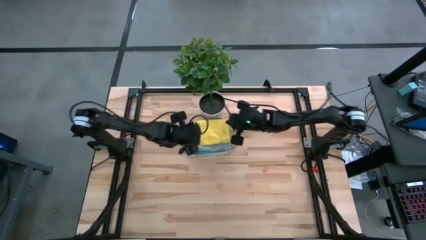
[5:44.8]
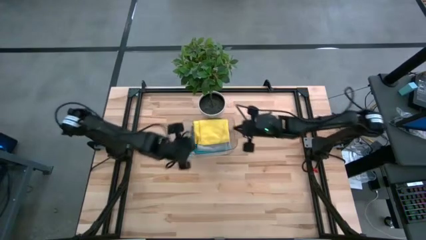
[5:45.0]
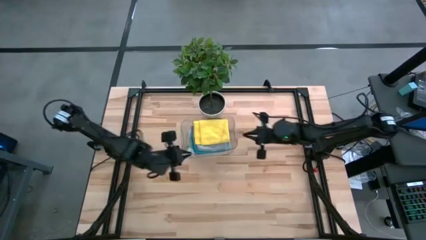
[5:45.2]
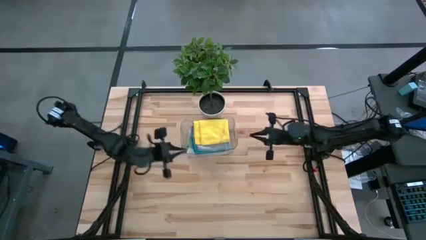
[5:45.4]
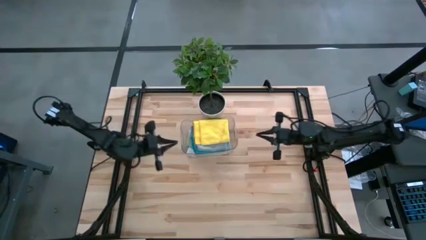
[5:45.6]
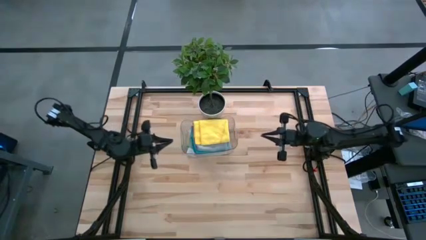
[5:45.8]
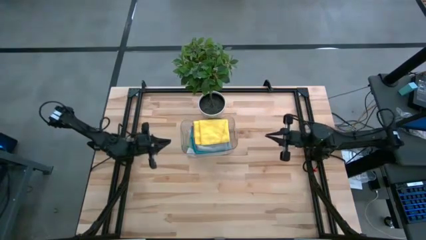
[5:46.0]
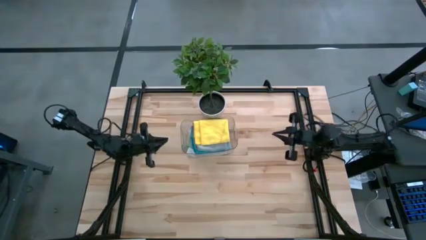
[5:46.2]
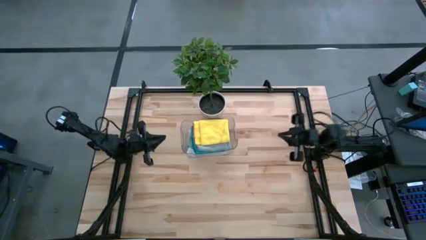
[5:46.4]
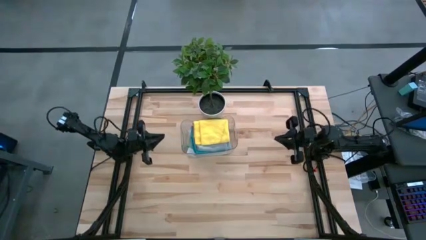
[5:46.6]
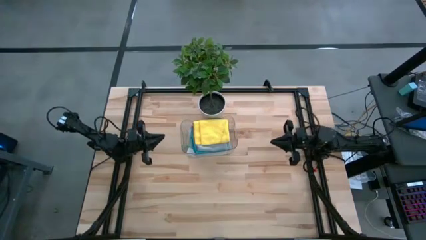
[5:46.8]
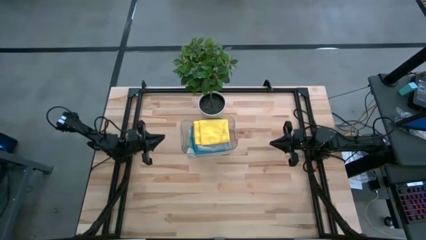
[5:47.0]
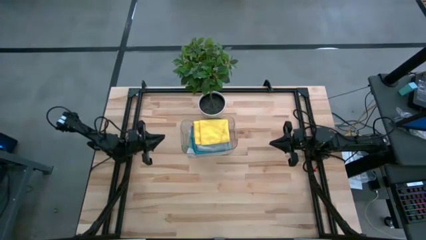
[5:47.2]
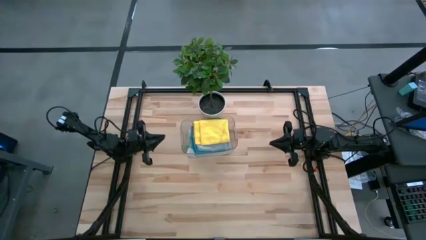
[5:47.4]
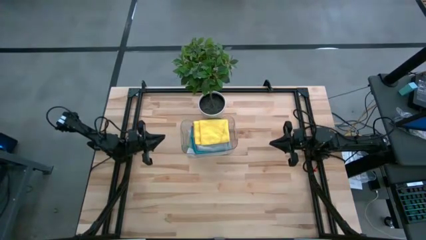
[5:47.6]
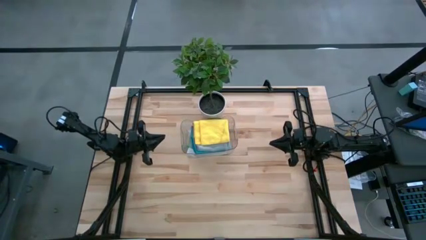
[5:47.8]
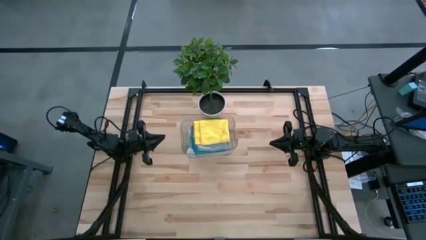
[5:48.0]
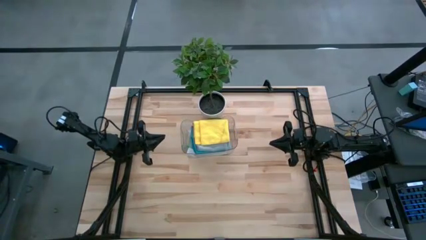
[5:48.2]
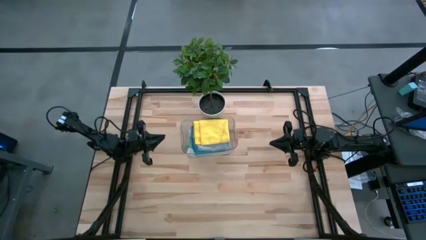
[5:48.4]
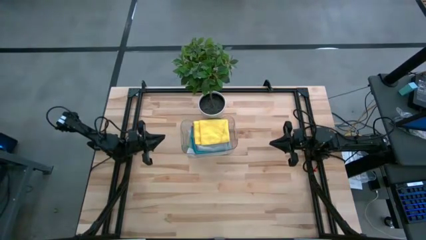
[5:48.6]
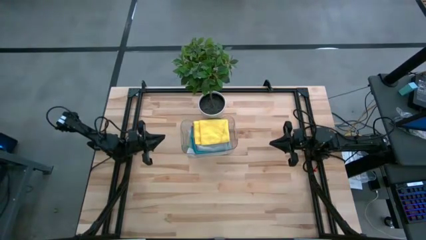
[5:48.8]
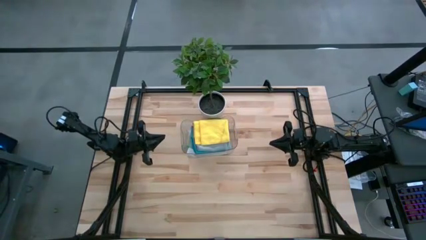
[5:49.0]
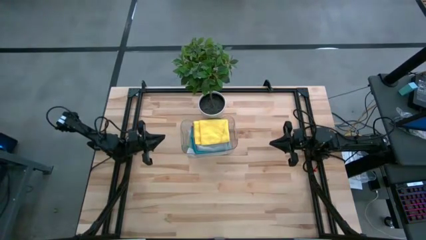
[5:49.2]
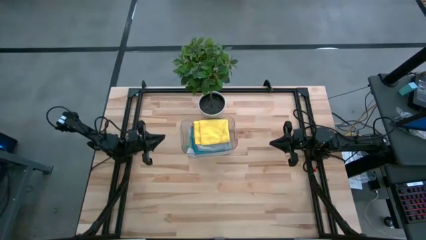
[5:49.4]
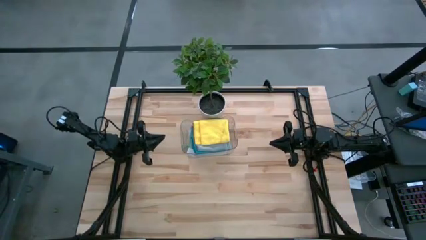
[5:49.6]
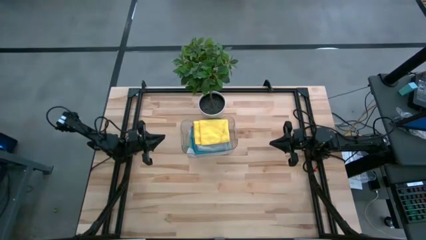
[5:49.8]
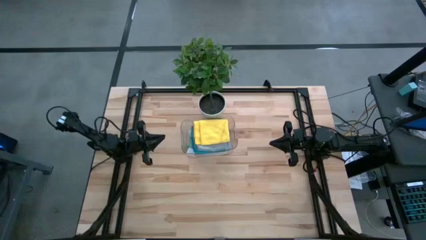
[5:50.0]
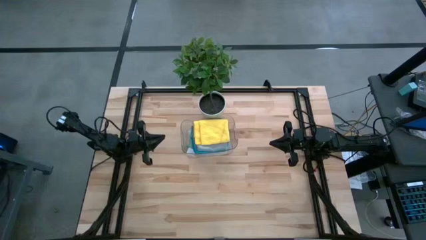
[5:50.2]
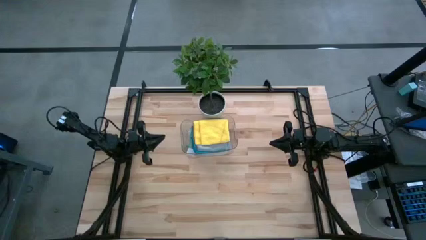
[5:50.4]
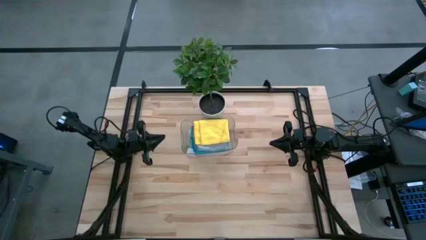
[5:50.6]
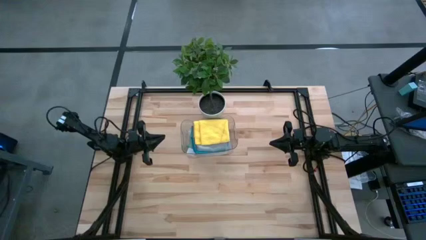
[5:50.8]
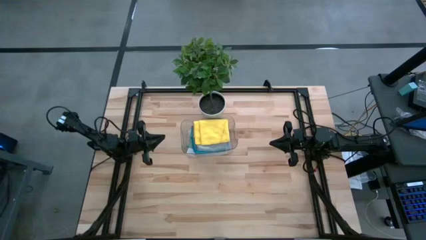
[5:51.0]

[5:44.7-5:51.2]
Task: Fold microfiber towels
Return to Home Position

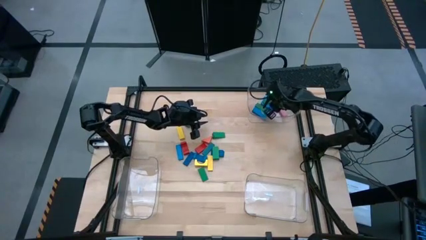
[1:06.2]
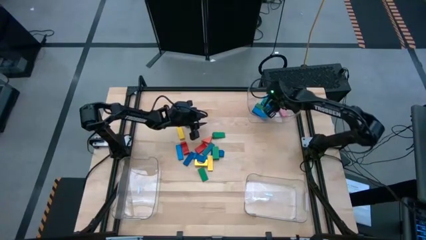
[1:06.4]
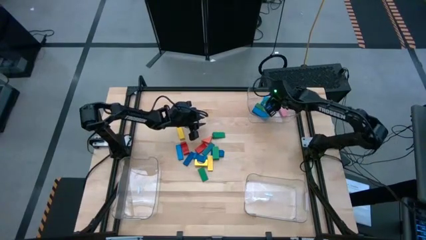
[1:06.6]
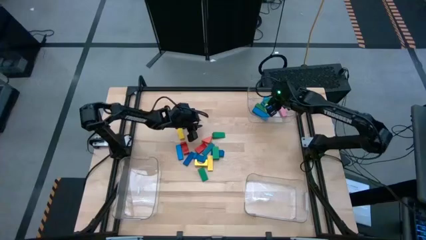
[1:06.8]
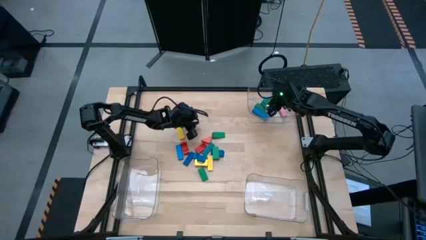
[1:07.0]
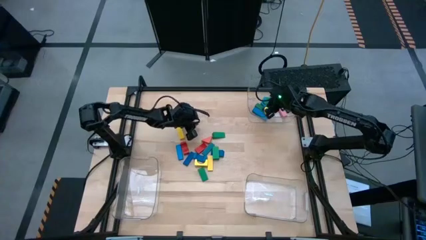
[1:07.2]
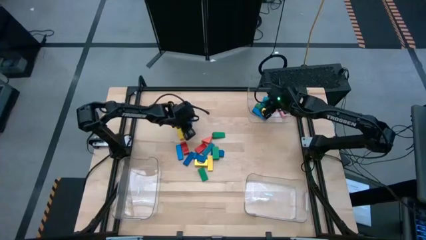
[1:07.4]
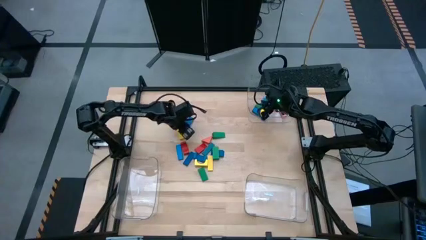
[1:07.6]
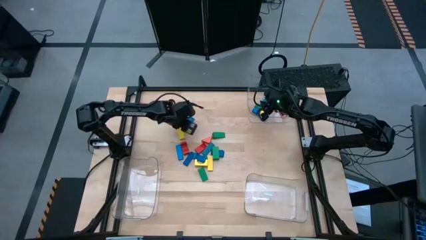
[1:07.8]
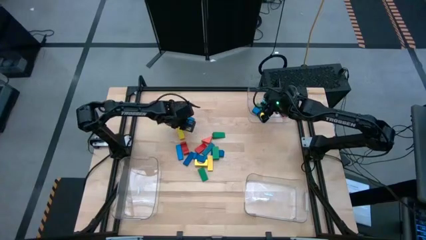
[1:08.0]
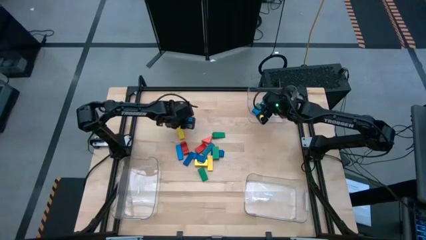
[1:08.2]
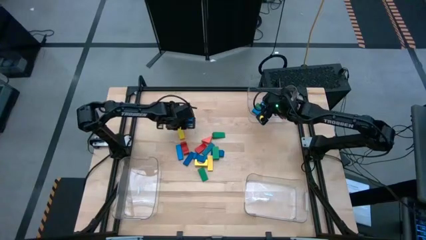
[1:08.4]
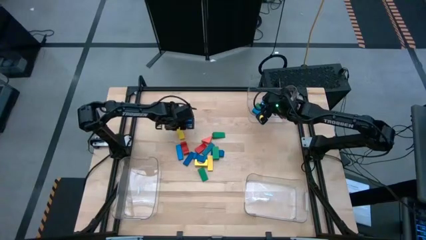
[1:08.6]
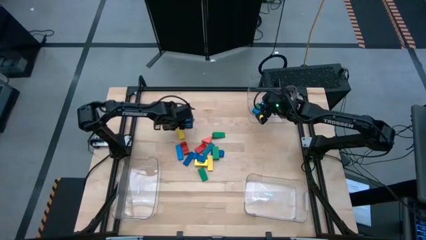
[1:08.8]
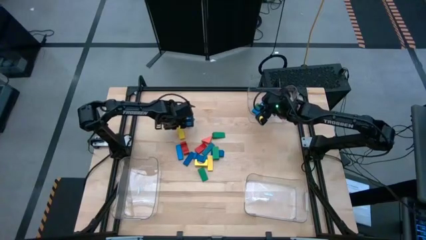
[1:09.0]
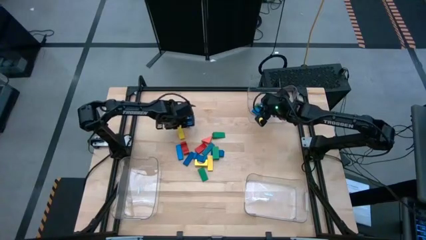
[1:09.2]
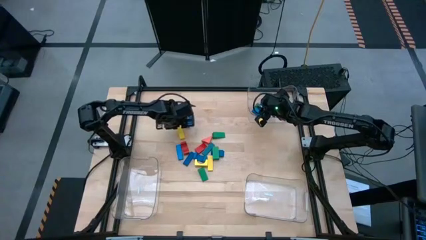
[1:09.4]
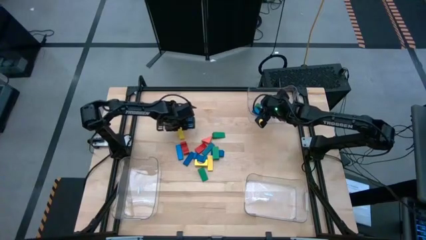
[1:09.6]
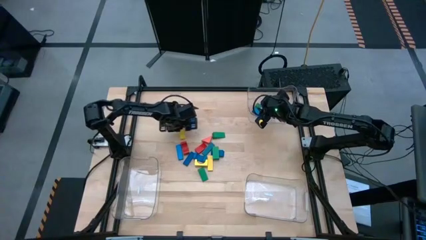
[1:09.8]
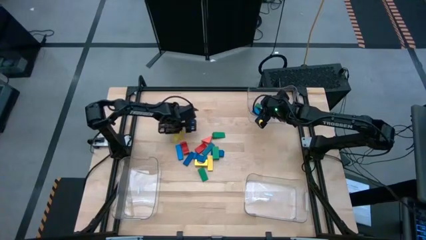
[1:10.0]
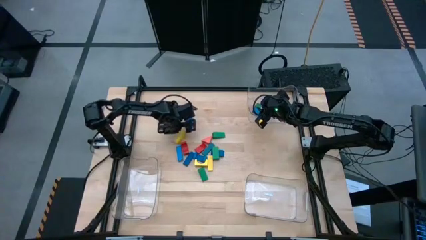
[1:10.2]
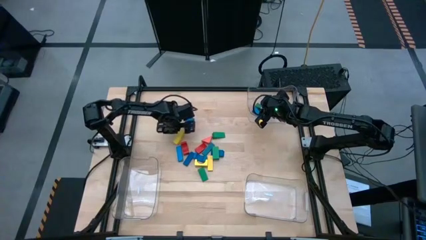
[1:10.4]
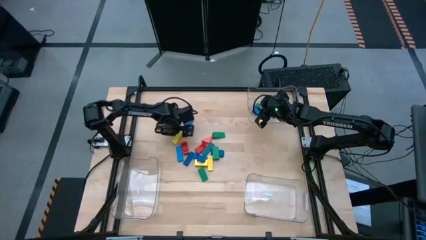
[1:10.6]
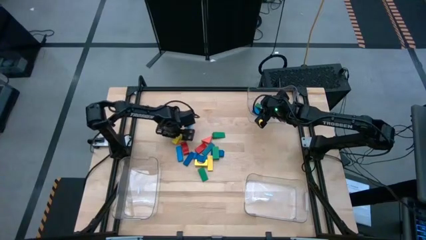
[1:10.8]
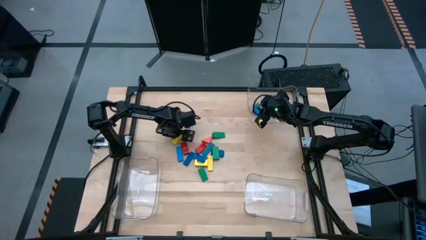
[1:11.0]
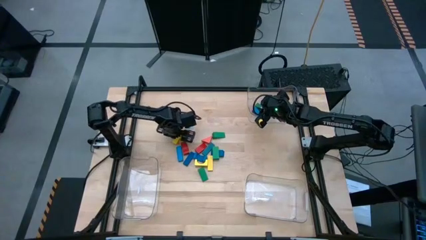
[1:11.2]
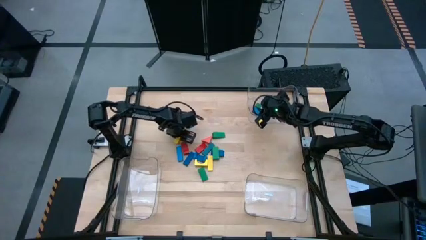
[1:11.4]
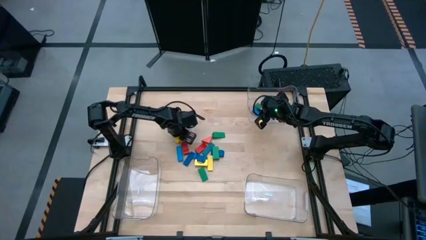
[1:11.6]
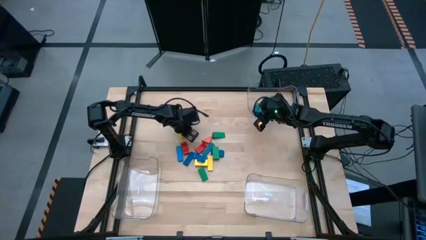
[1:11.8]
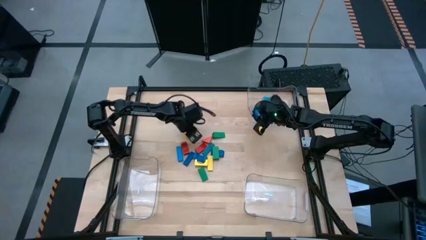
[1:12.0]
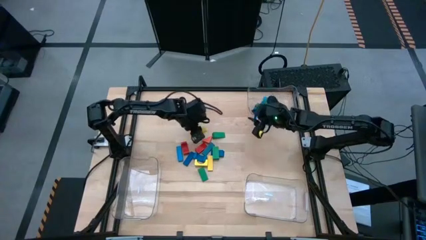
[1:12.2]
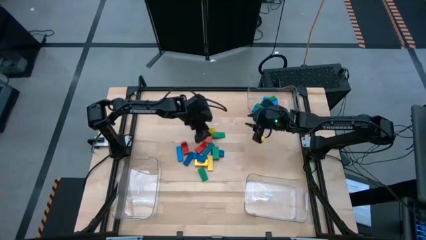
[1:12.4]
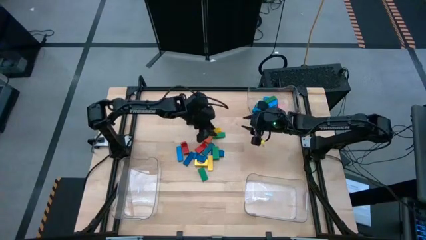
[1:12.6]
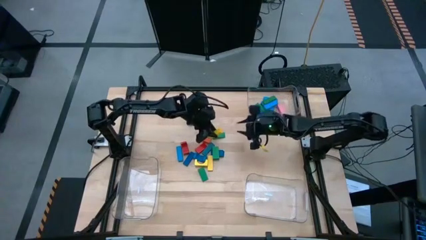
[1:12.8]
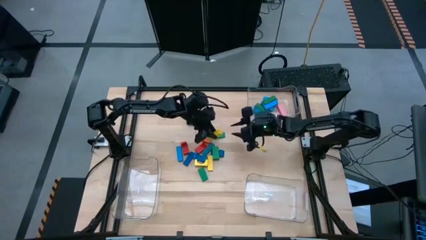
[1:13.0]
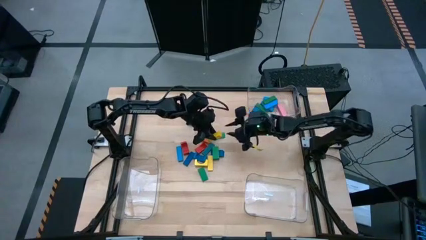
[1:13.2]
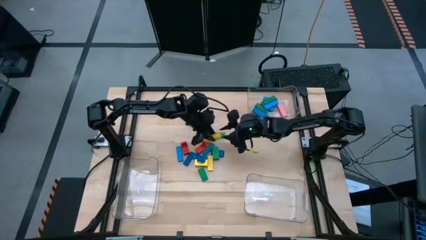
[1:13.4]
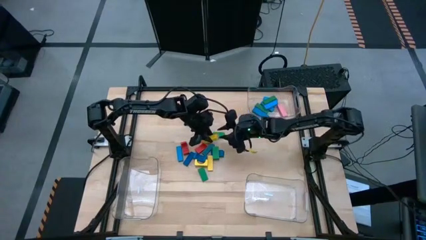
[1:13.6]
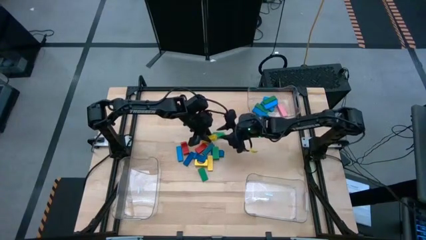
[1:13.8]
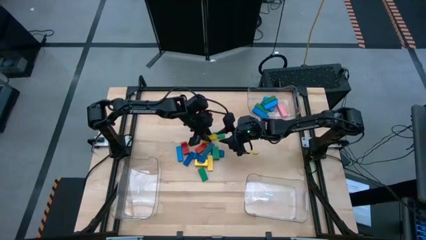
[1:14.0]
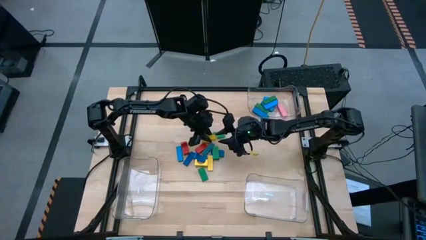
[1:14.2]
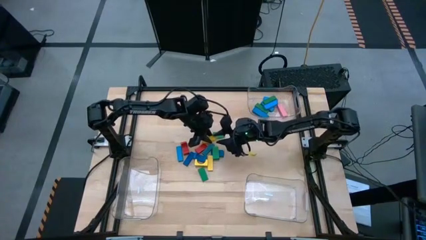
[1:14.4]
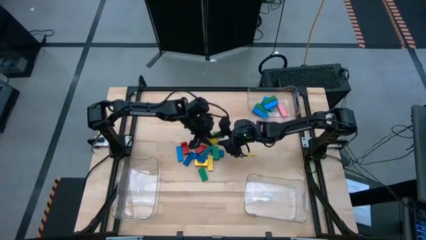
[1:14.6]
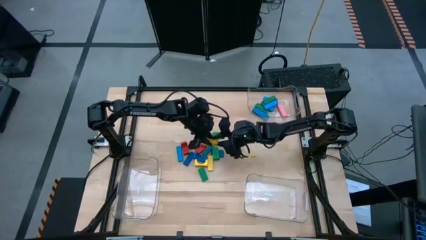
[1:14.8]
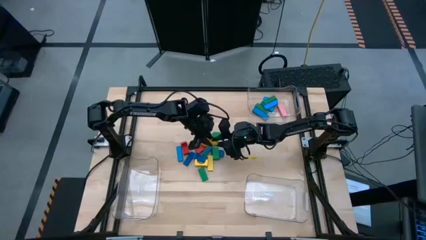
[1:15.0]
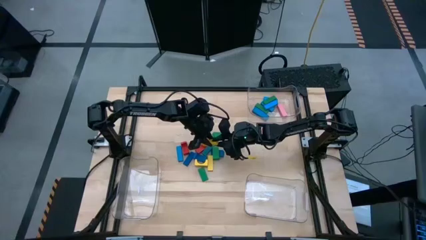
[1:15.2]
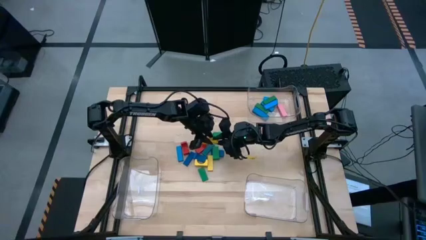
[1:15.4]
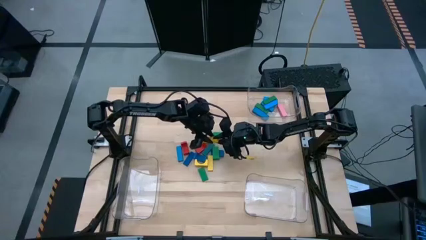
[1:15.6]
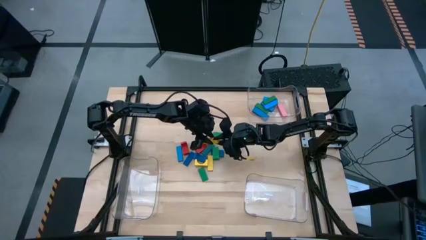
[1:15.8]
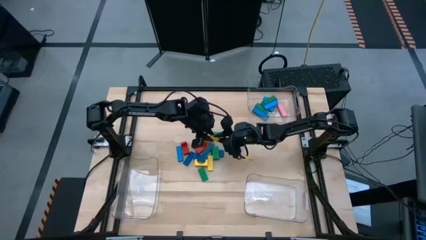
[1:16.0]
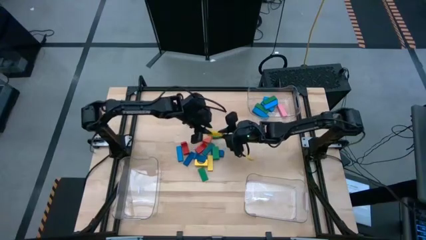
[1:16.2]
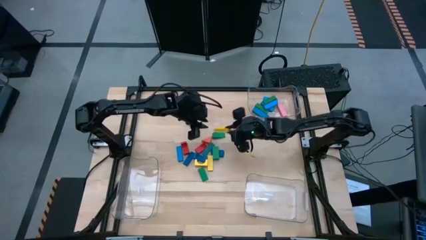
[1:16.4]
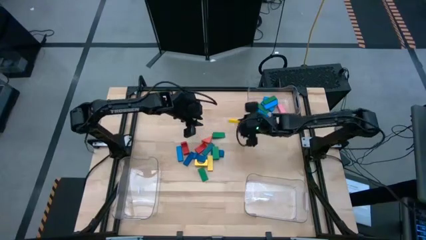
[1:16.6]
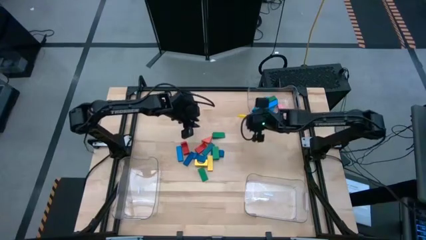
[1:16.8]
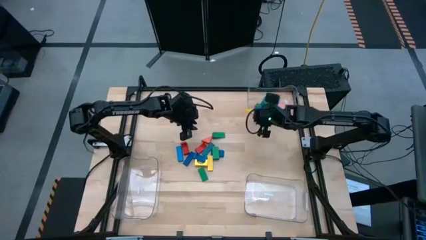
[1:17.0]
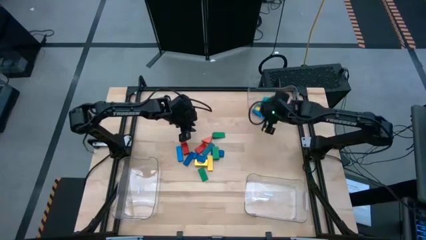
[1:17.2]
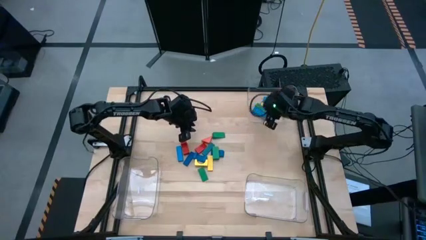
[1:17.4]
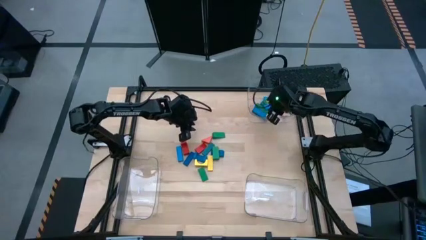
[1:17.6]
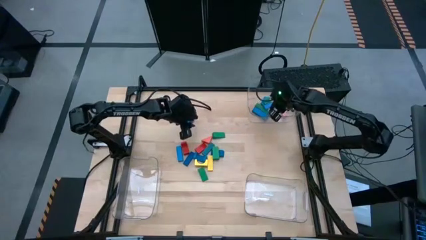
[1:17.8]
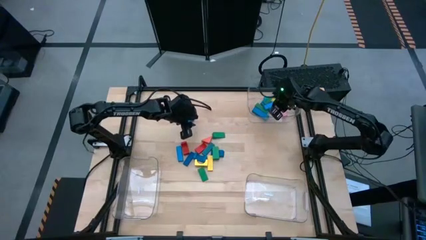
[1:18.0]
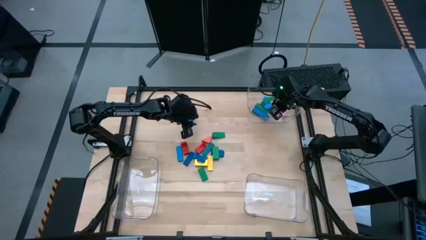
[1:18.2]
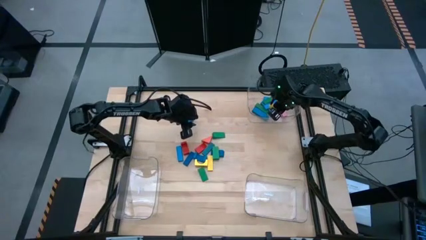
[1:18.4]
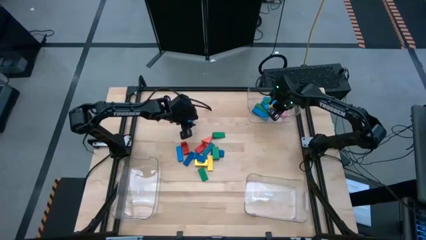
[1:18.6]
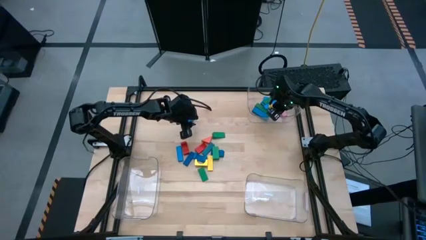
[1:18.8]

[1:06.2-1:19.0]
Task: Sort blocks by size
Put the yellow rectangle block into the top transparent bin
